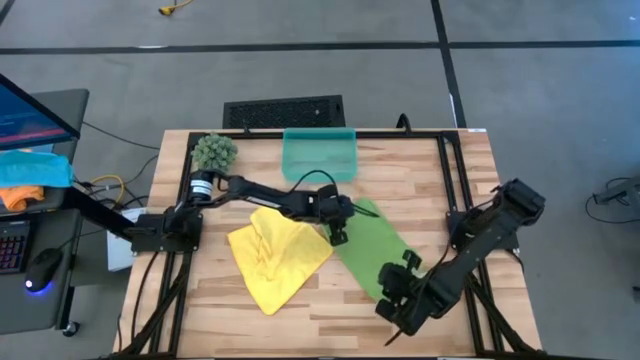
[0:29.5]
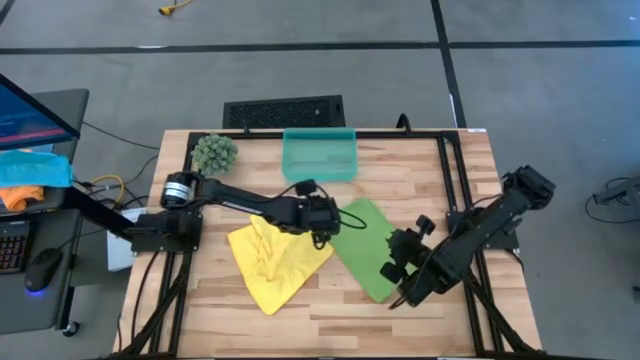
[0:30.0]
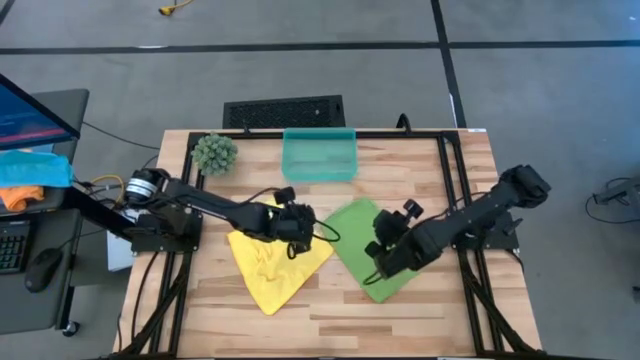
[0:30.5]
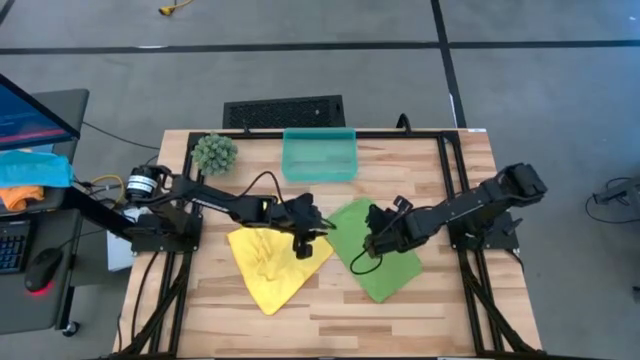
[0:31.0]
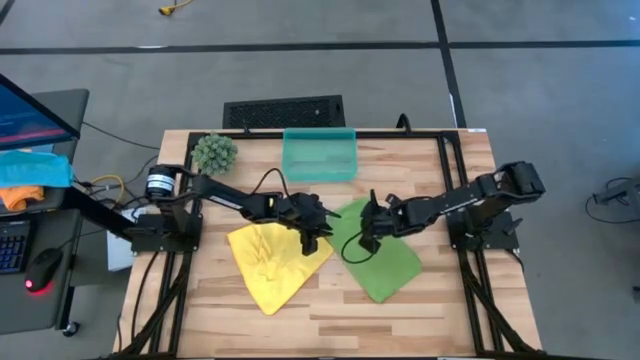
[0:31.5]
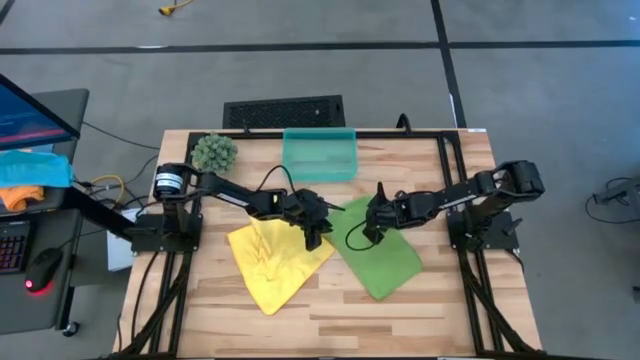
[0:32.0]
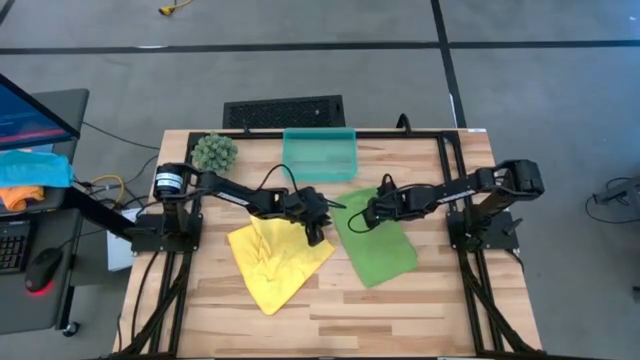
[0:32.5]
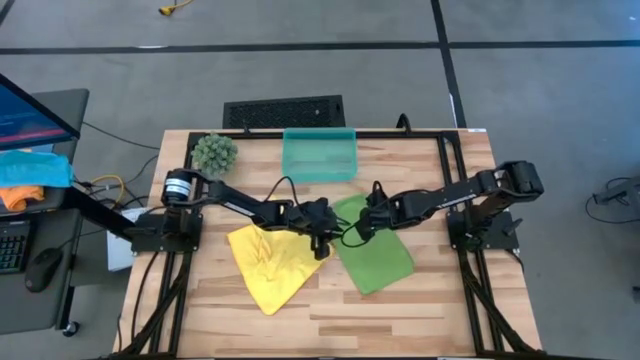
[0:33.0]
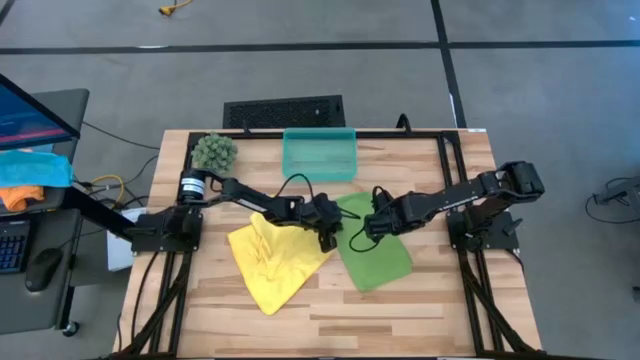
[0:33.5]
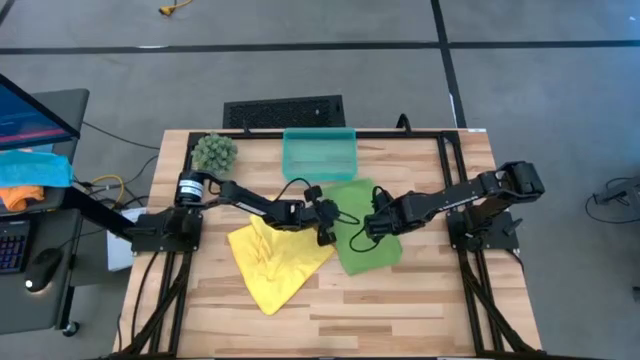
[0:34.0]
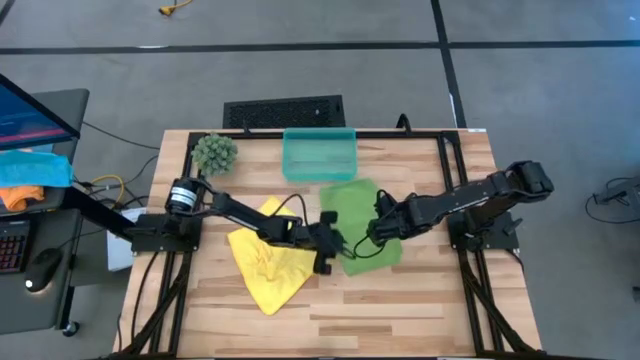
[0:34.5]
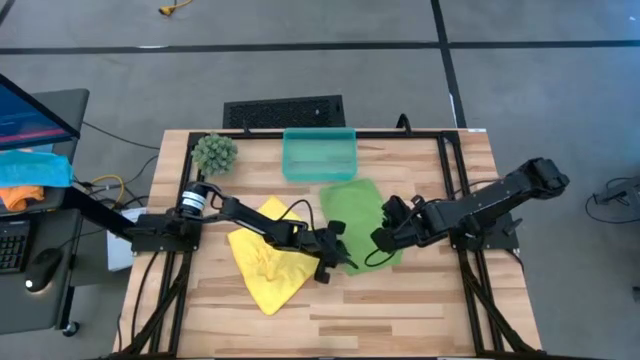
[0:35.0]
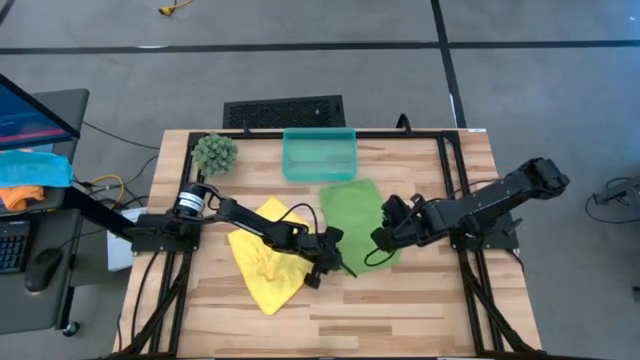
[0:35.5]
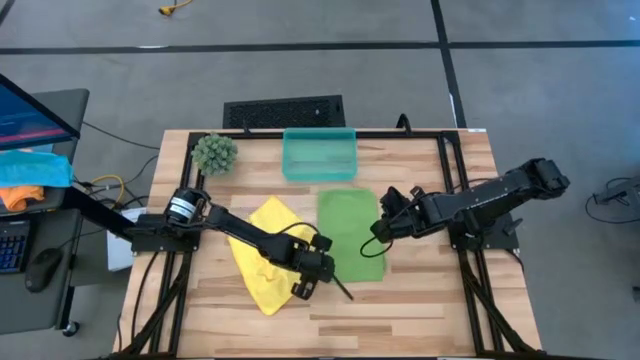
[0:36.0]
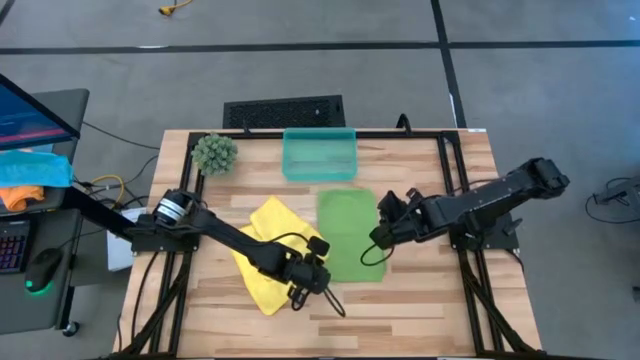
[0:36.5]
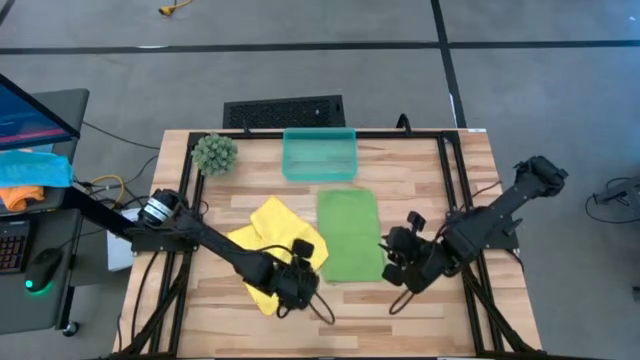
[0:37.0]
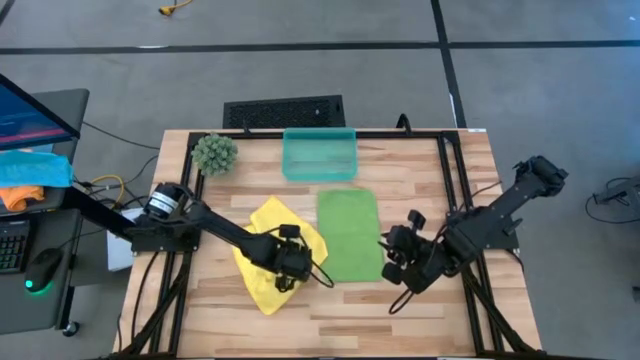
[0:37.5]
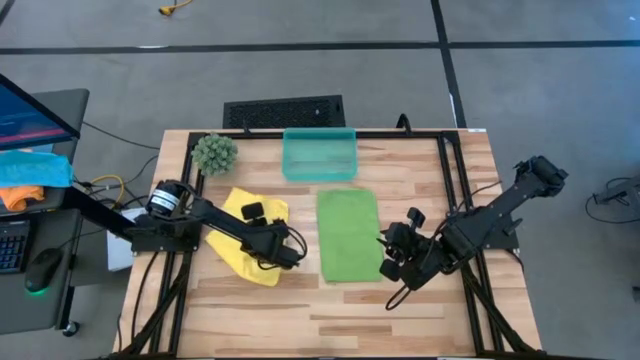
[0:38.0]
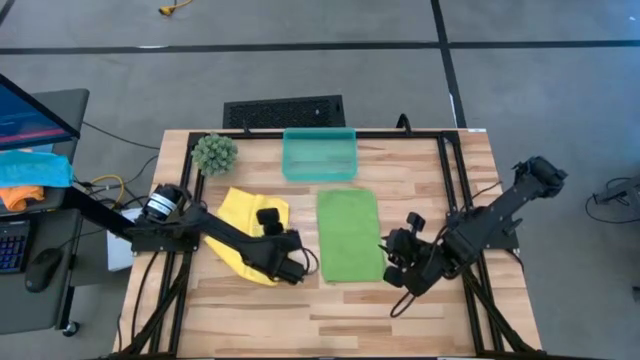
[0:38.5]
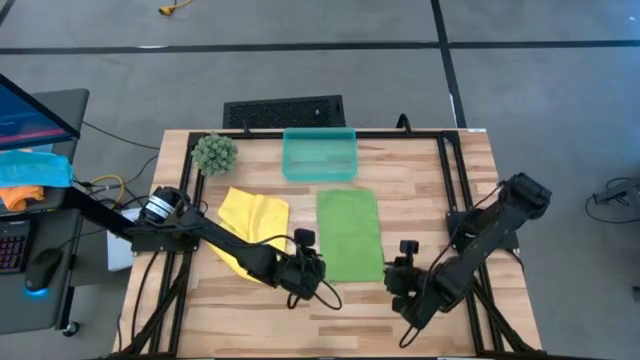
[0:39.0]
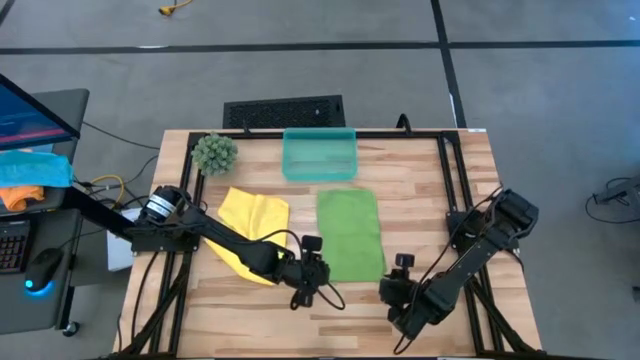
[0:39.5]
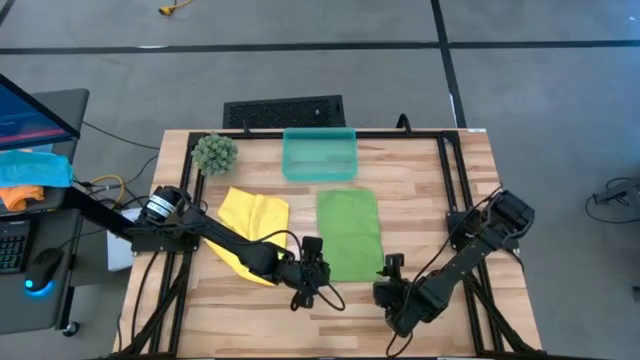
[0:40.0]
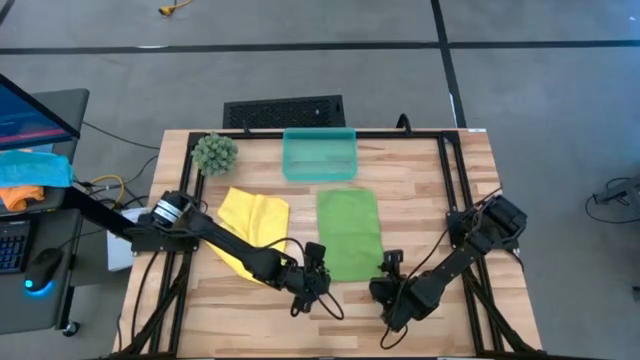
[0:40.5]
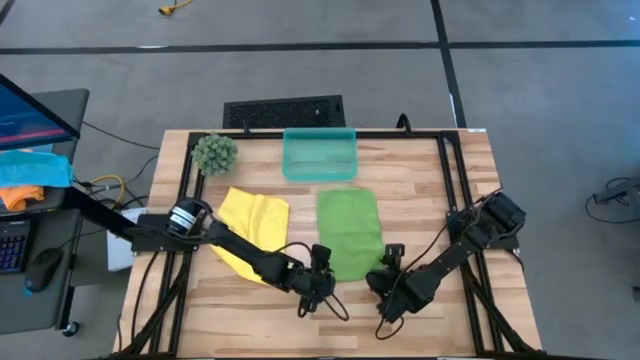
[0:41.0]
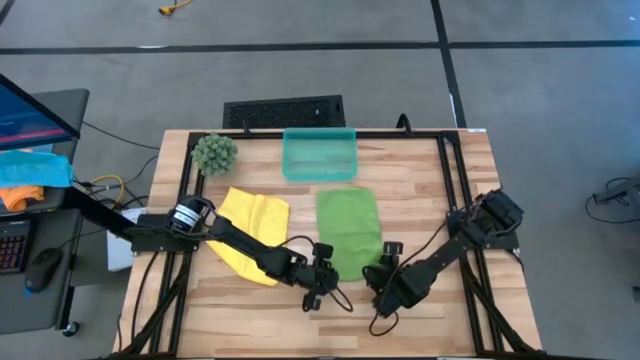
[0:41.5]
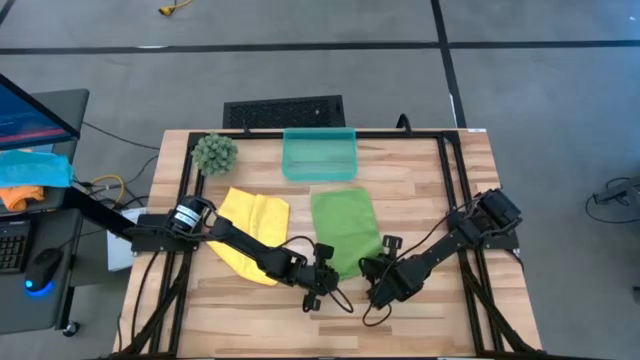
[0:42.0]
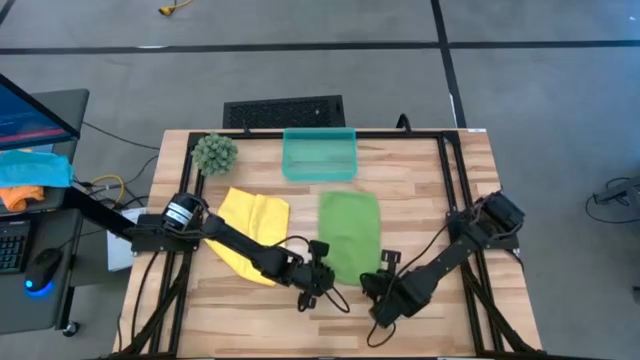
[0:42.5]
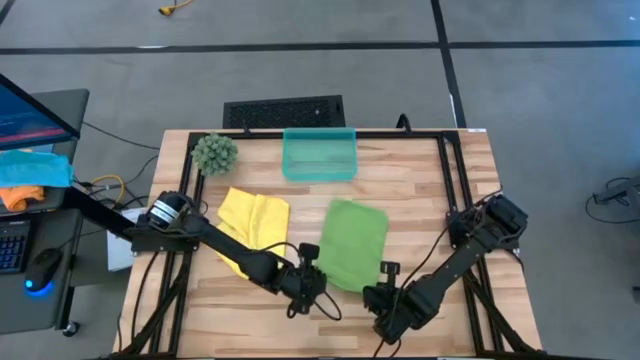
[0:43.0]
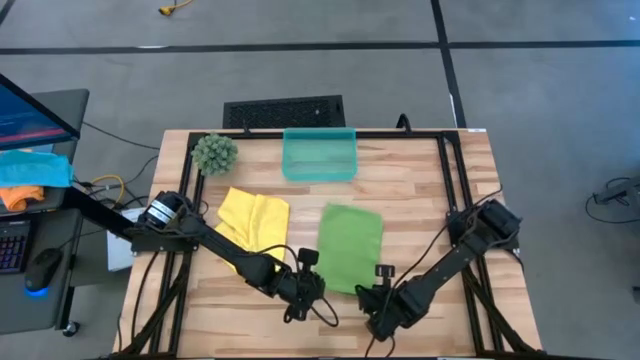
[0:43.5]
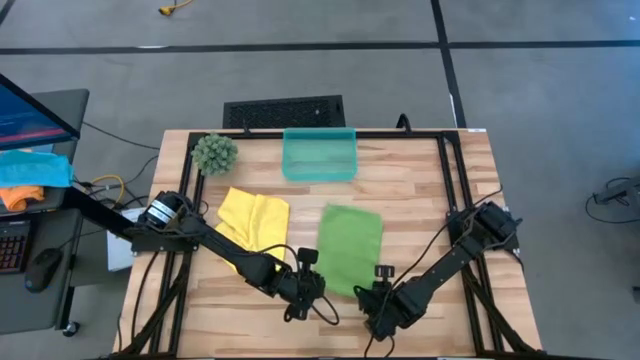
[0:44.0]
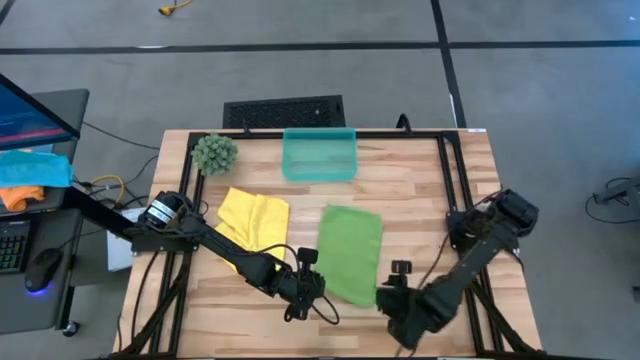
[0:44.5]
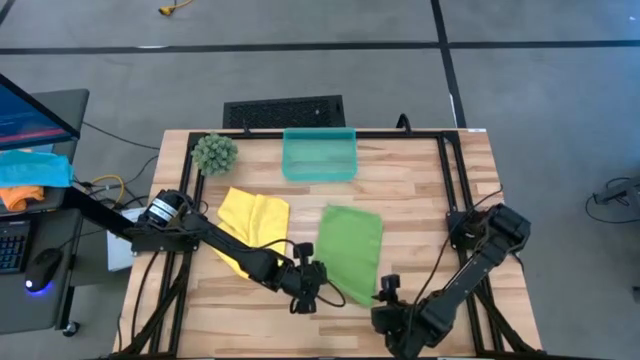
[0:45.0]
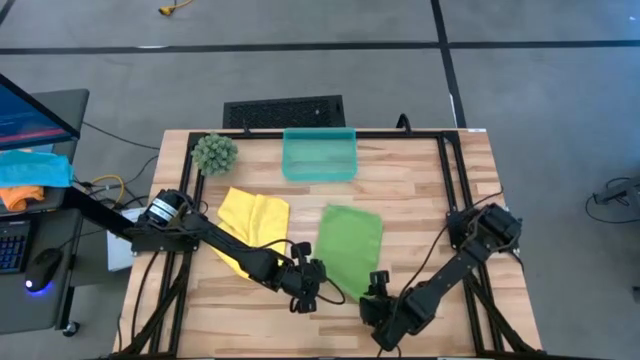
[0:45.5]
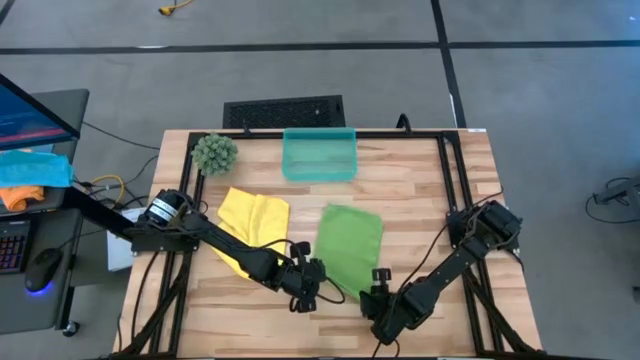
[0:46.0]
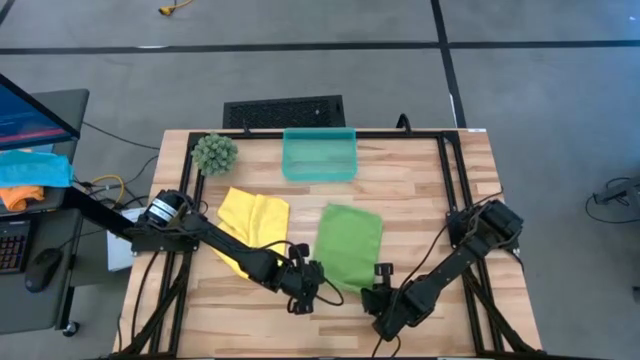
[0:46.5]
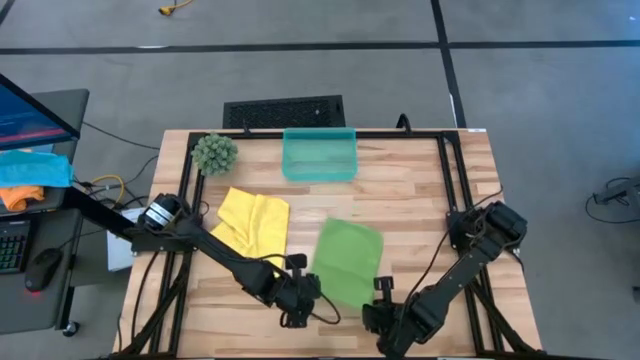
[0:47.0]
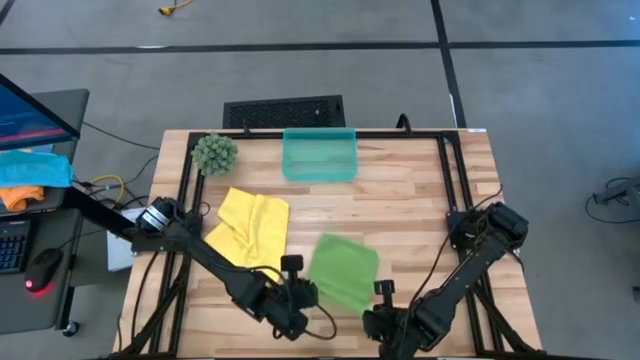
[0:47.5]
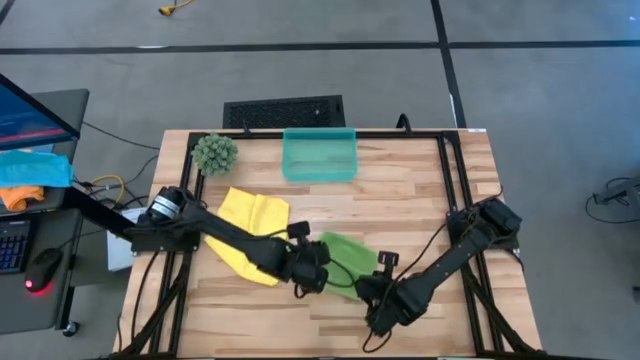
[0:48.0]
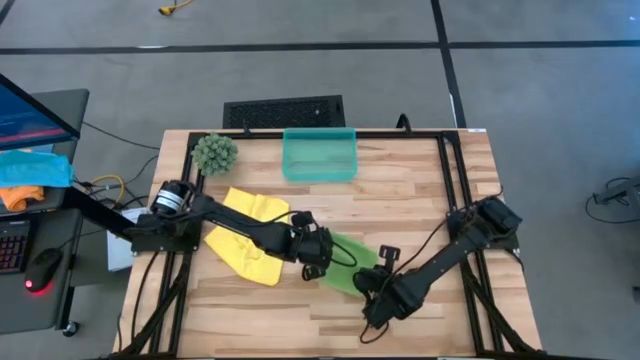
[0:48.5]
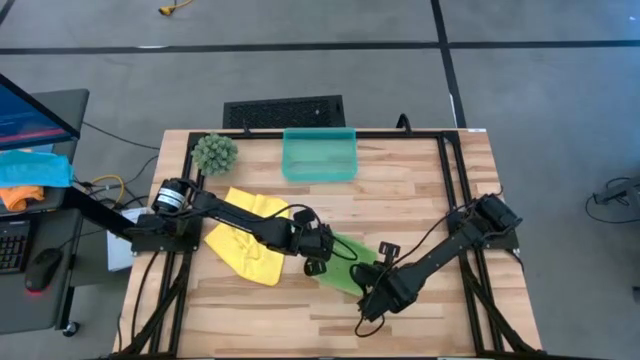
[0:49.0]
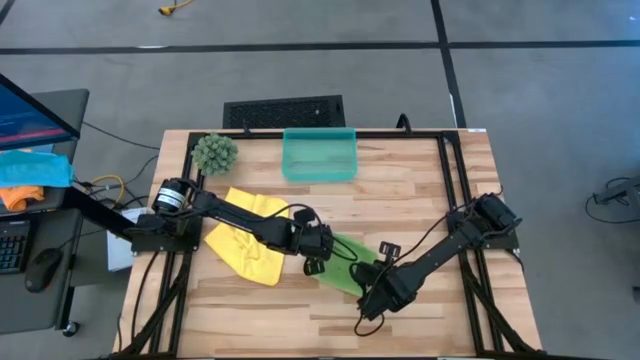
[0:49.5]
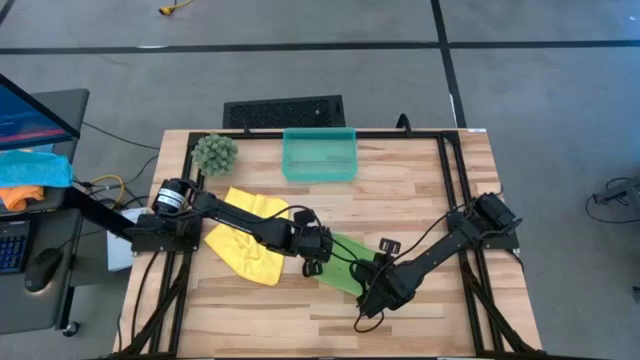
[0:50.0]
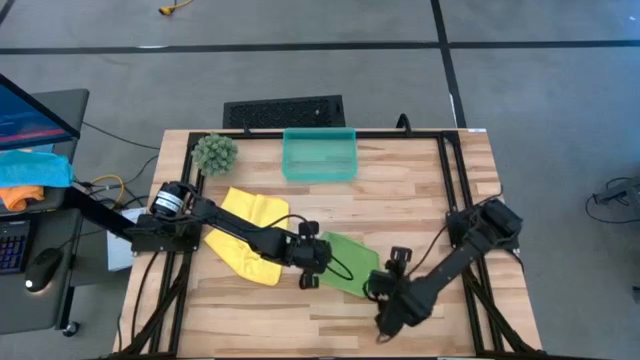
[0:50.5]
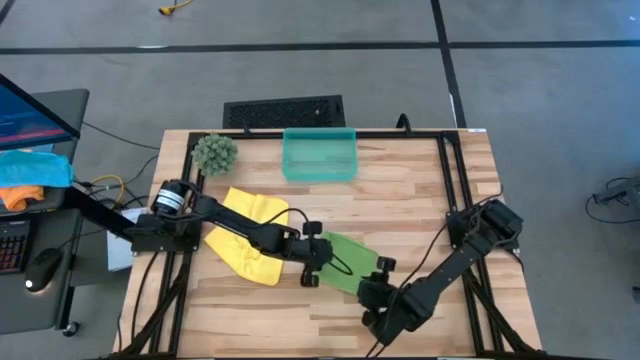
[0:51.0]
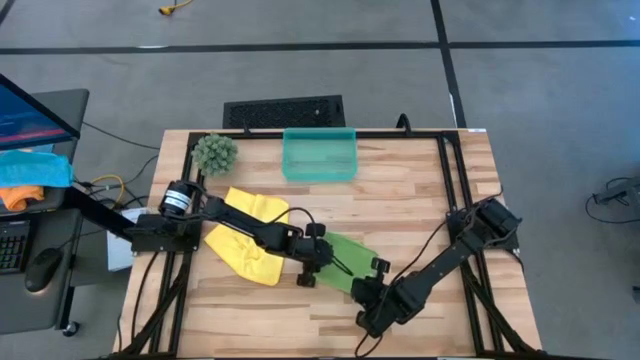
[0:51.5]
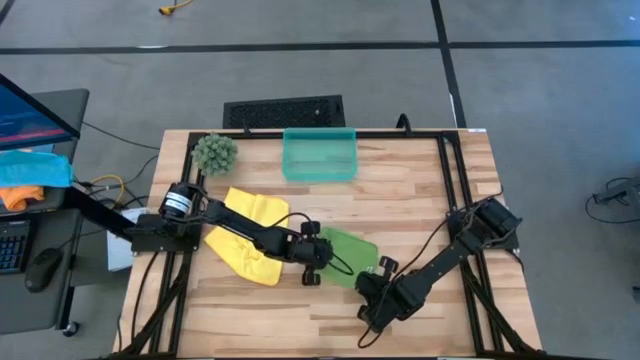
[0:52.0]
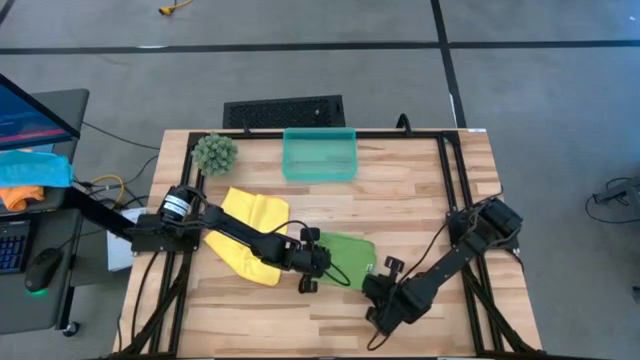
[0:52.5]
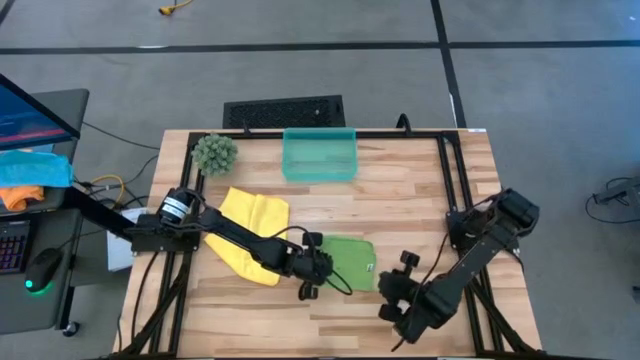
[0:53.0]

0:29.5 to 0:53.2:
Task: Roll microfiber towels into tight, uniform cylinder then place into a basket
Fold the green microfiber cloth
